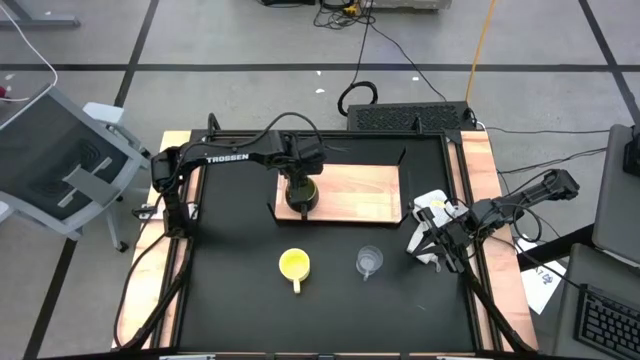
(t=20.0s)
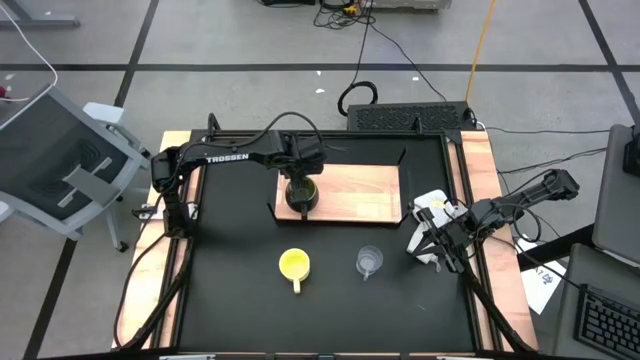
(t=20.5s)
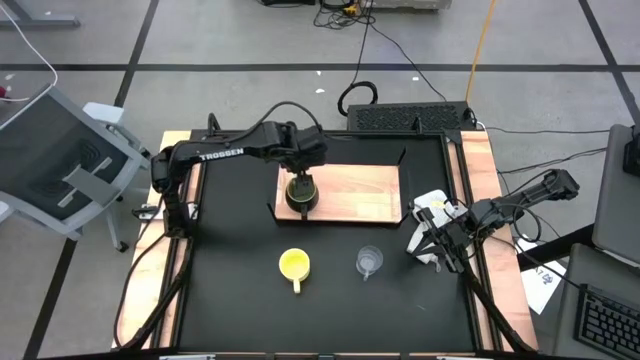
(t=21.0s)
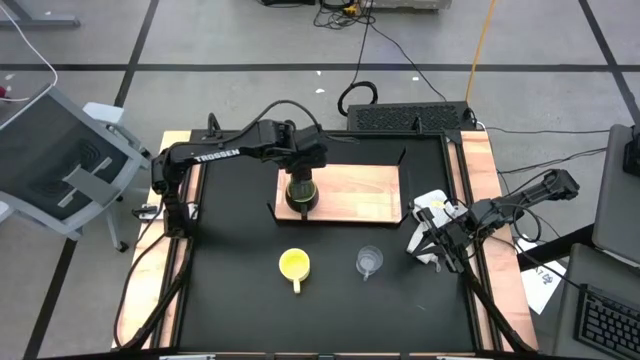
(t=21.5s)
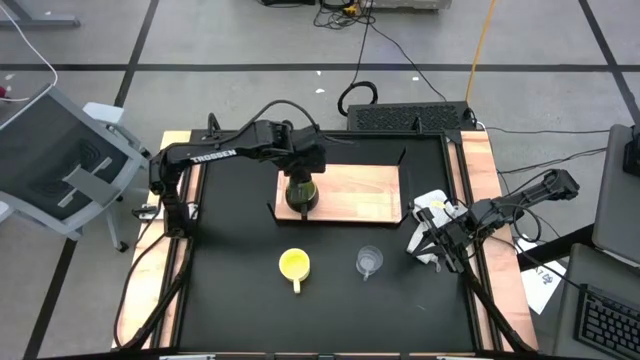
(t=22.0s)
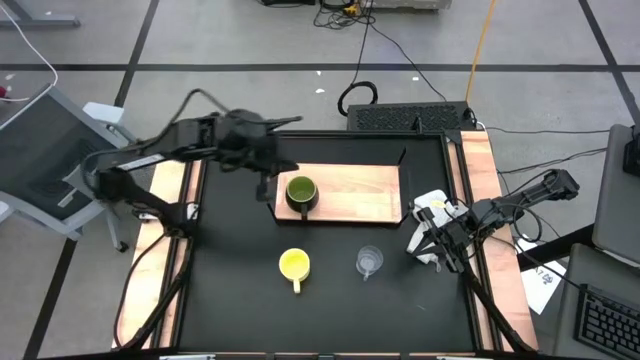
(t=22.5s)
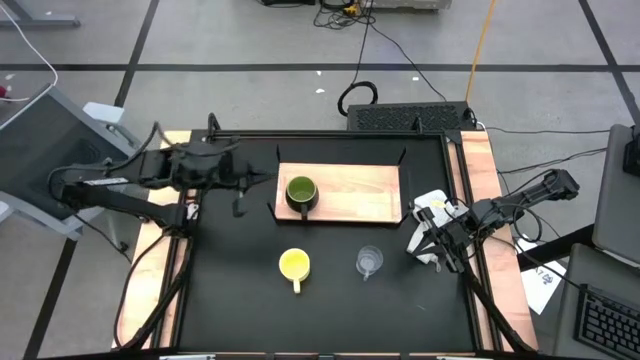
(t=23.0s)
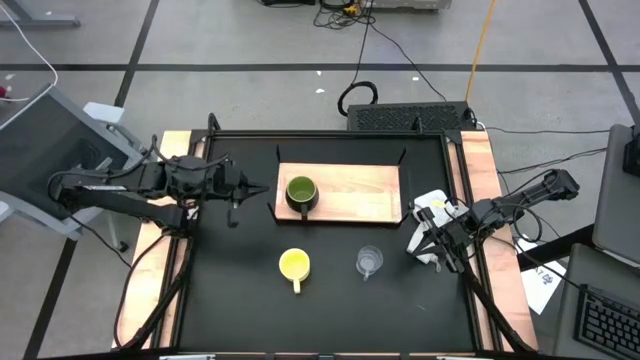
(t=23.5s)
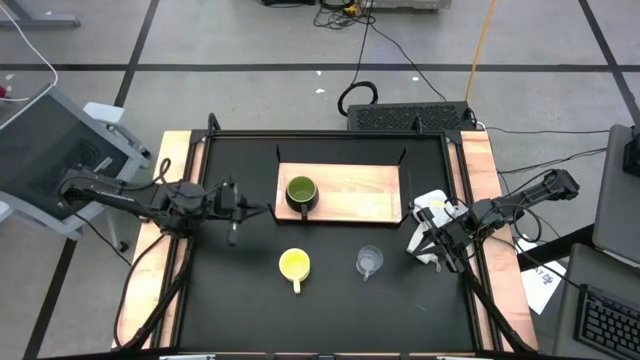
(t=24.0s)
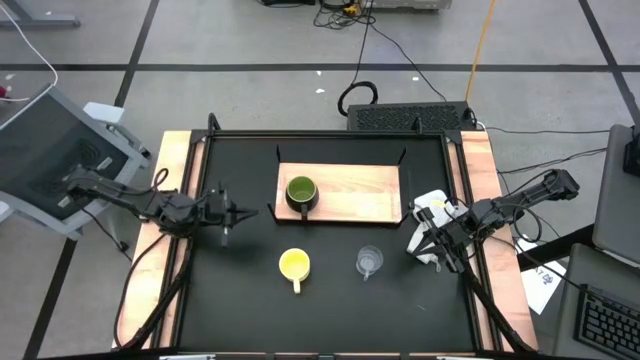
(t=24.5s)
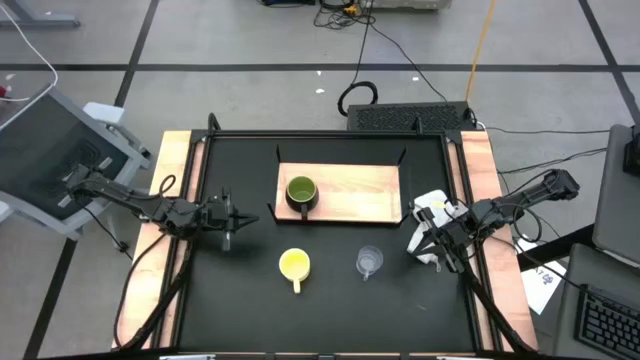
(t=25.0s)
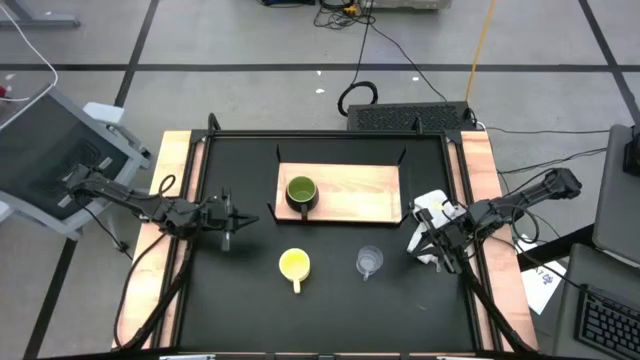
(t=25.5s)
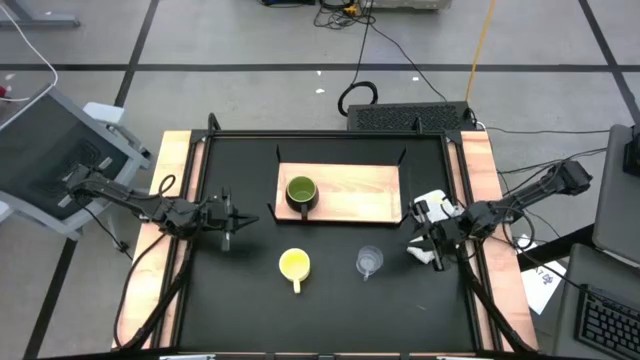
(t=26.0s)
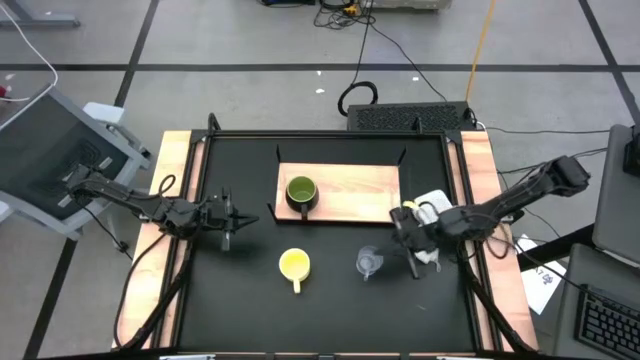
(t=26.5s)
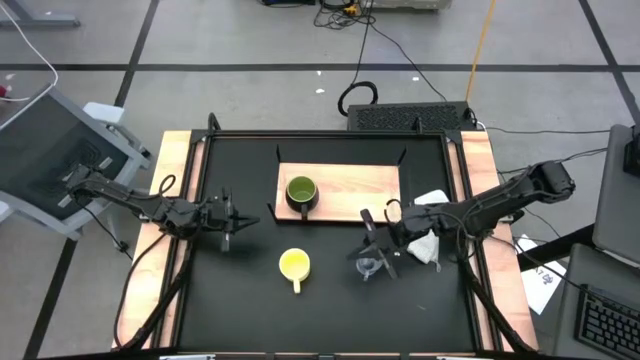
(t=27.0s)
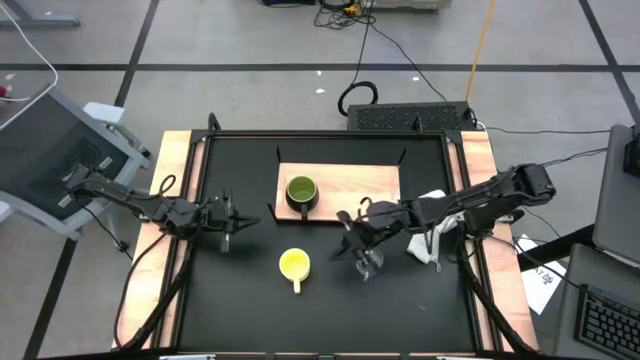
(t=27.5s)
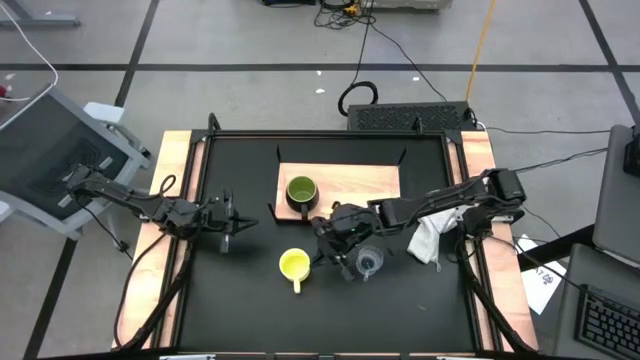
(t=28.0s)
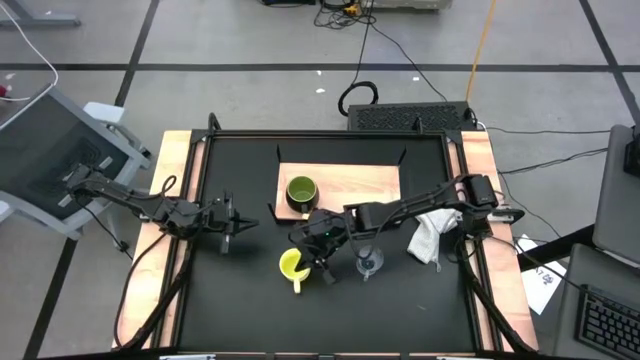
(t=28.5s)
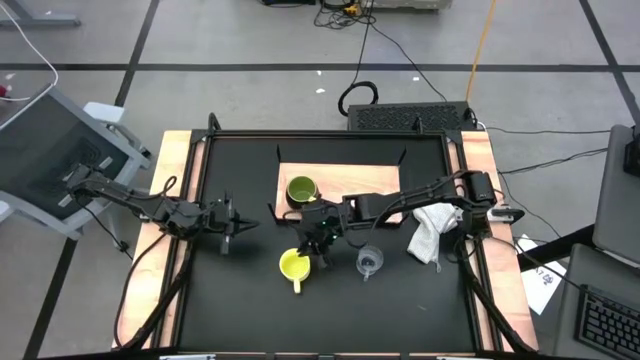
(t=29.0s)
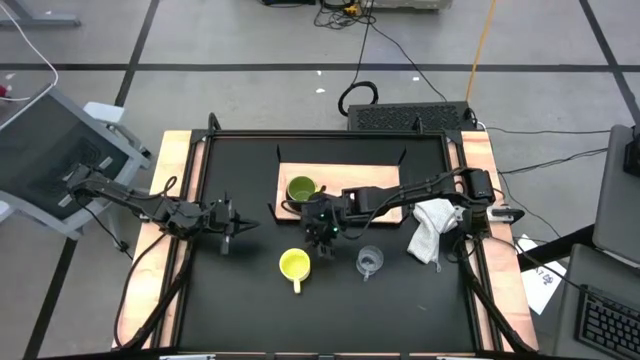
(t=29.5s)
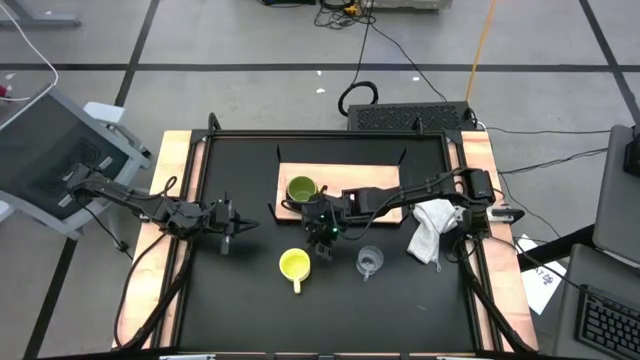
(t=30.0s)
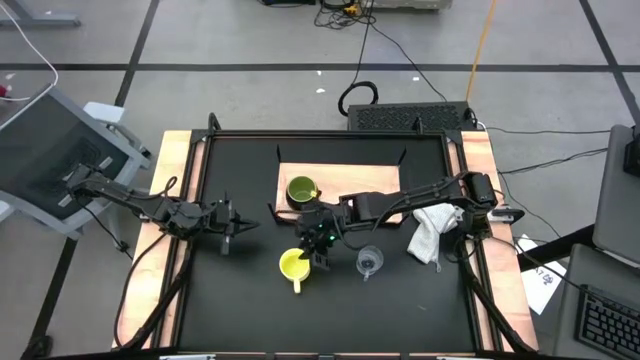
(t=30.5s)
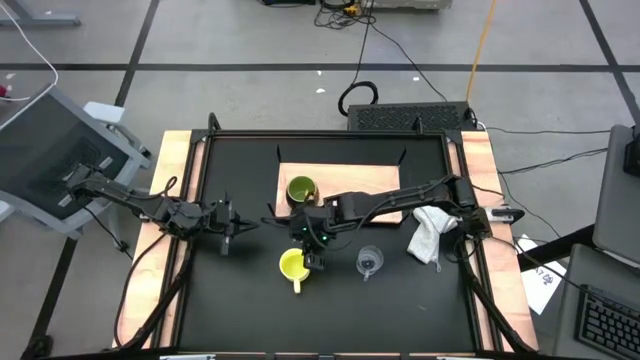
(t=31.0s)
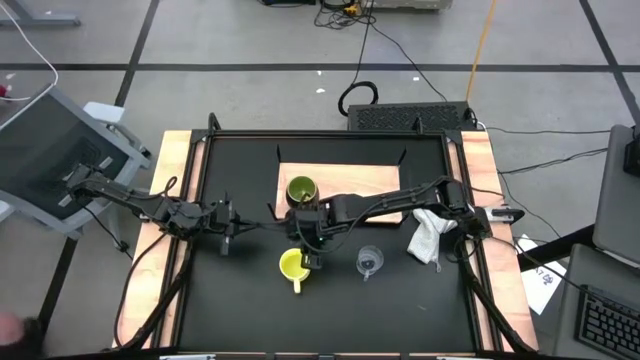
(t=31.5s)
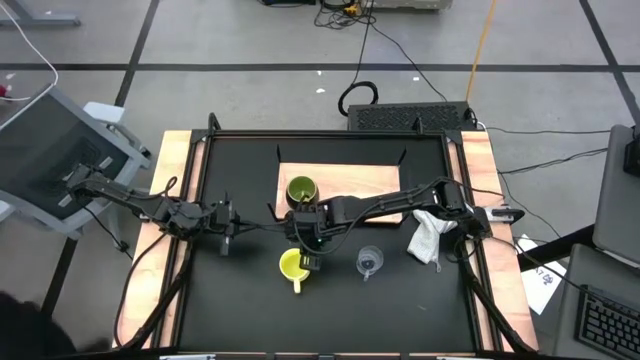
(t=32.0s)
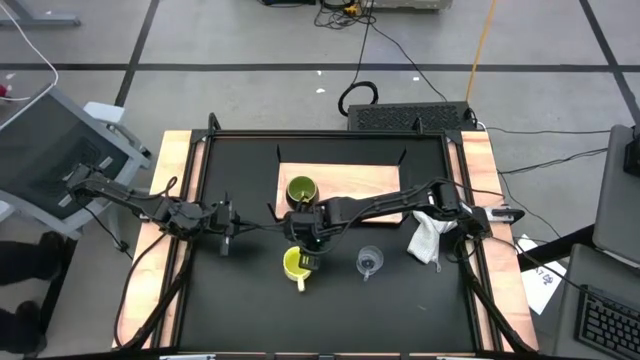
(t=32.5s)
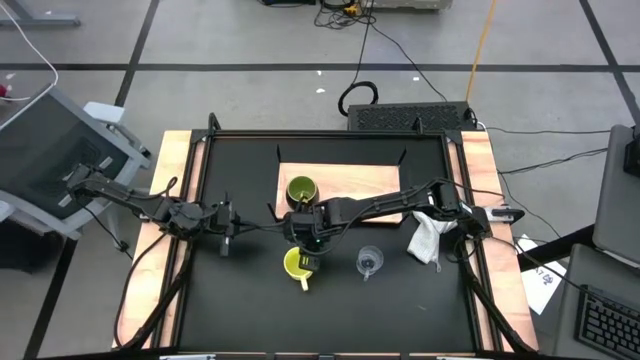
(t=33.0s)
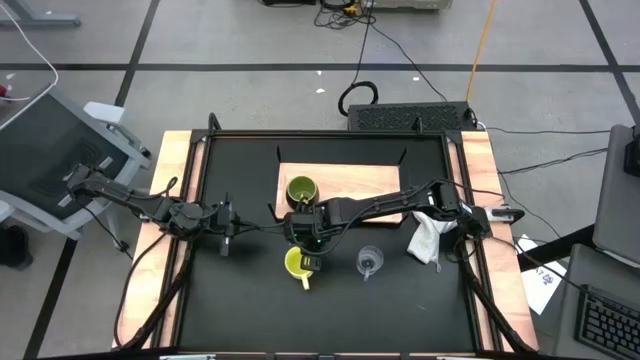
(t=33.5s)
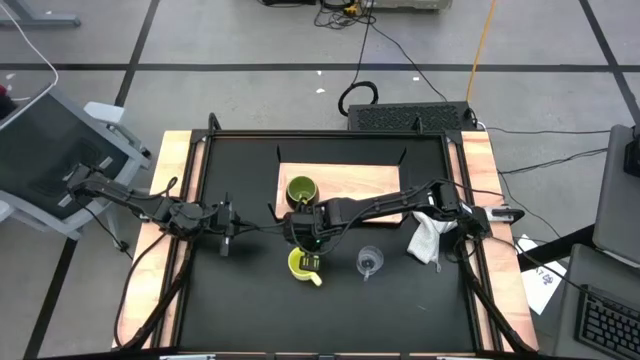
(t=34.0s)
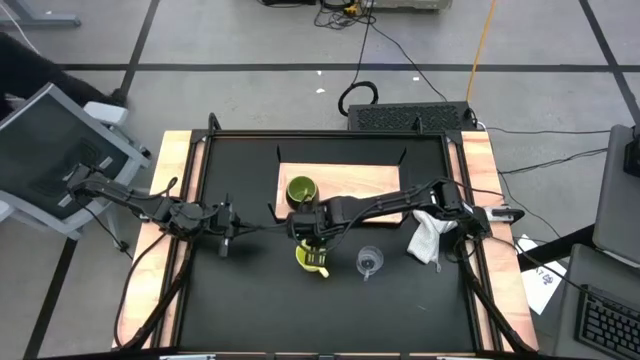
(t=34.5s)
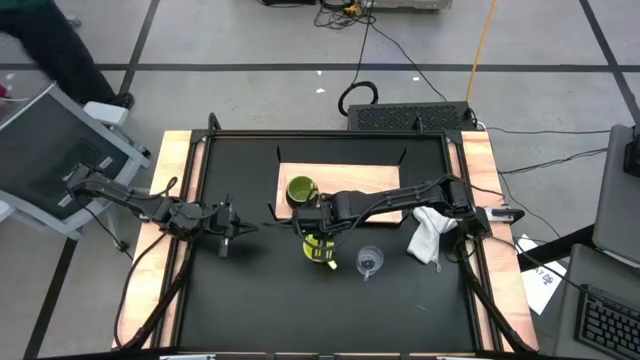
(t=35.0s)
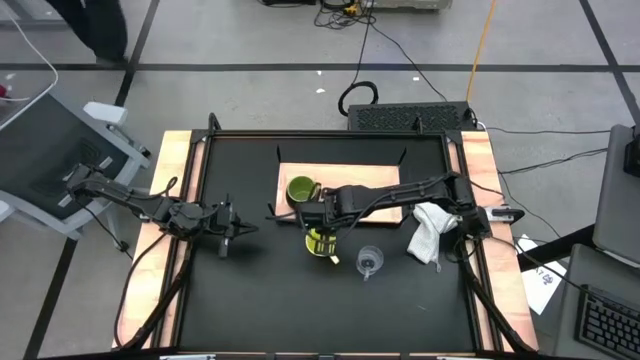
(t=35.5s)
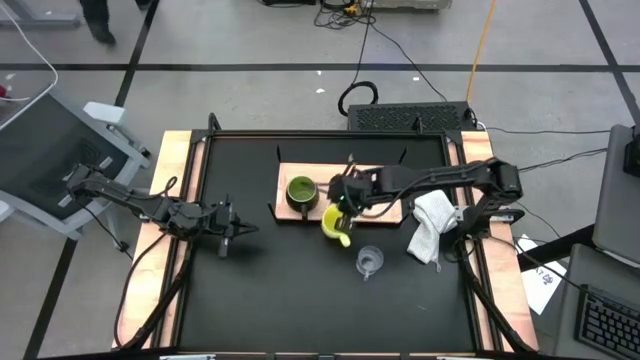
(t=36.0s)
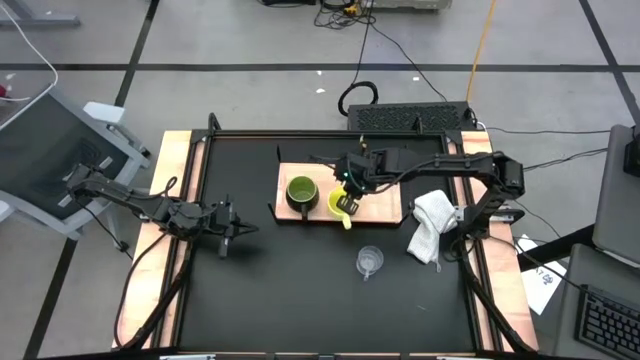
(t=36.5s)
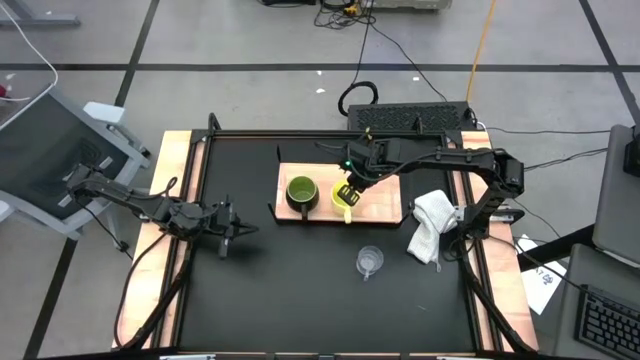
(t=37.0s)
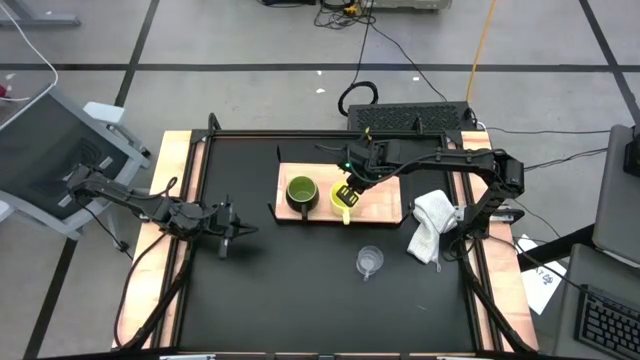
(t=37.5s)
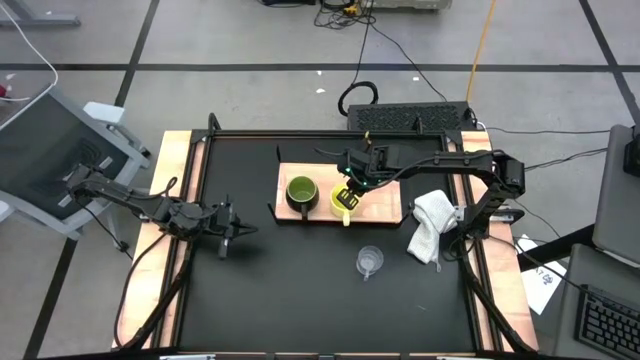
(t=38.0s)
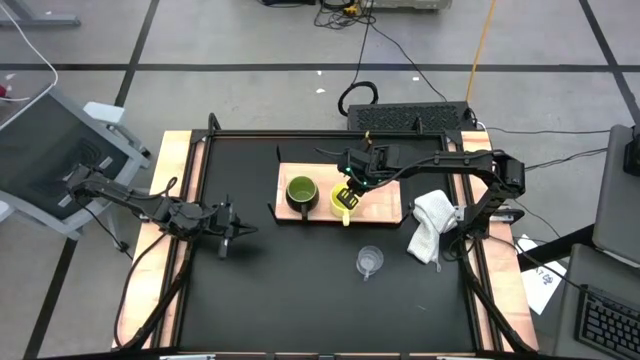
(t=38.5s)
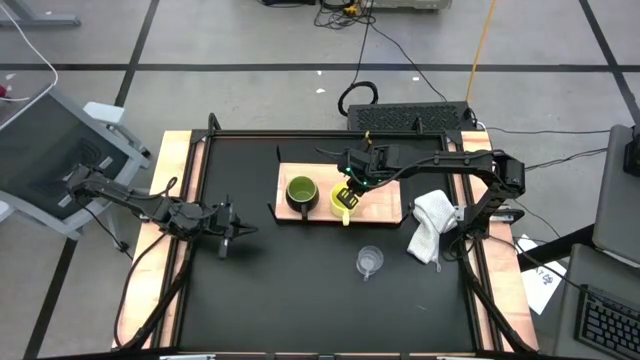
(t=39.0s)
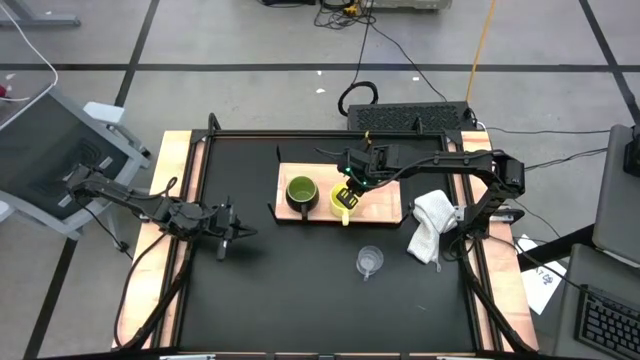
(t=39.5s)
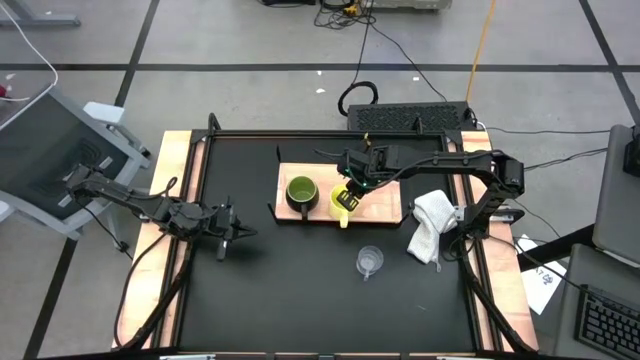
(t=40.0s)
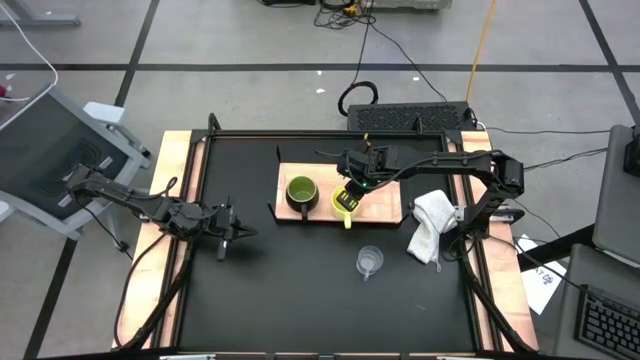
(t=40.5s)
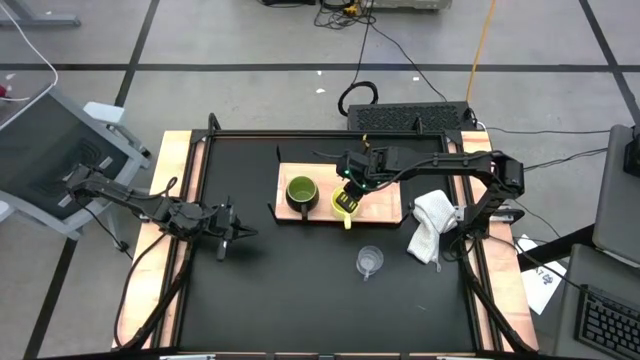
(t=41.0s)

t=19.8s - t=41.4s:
Task: Stack small to large cups/mugs on shelf
Put the yellow mug on the shelf
